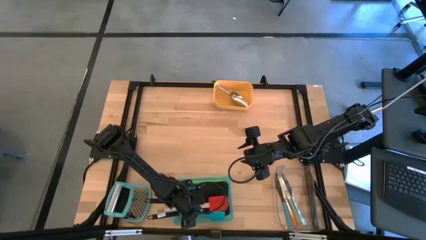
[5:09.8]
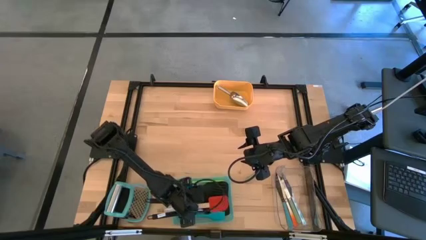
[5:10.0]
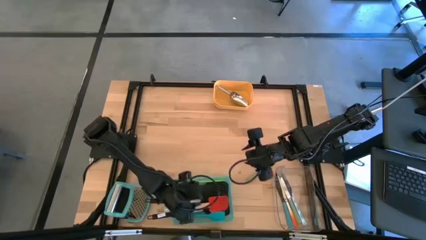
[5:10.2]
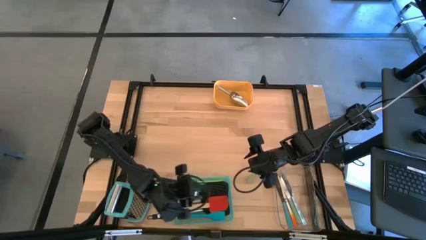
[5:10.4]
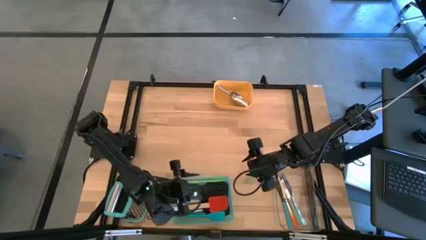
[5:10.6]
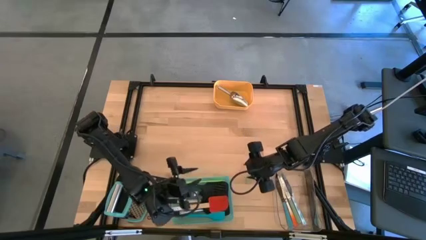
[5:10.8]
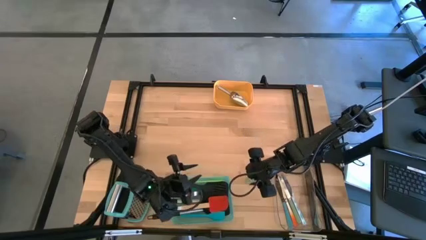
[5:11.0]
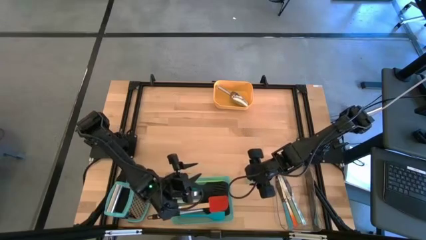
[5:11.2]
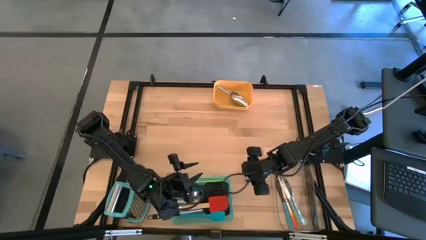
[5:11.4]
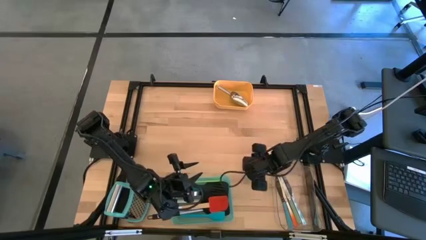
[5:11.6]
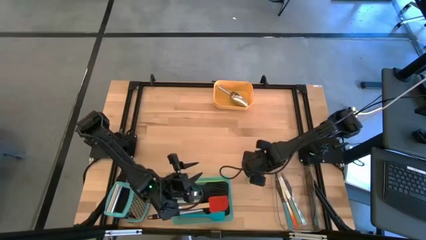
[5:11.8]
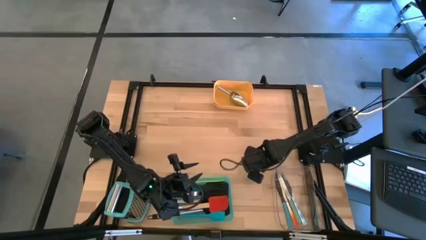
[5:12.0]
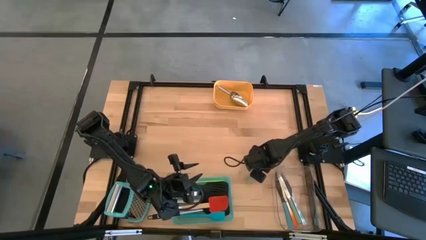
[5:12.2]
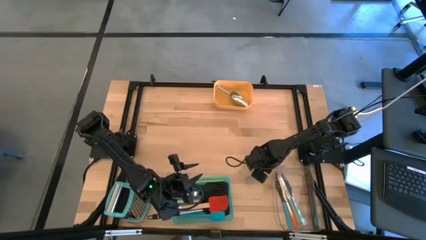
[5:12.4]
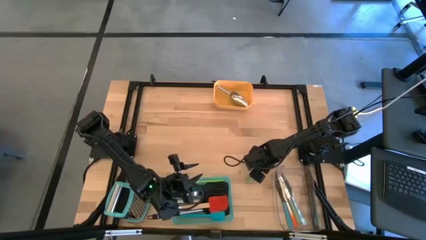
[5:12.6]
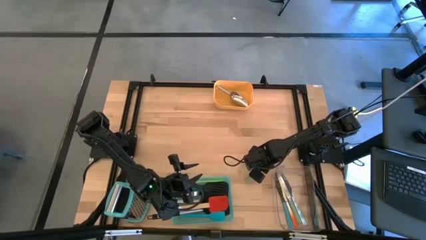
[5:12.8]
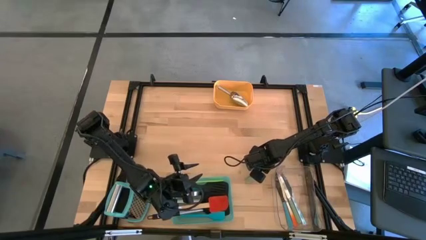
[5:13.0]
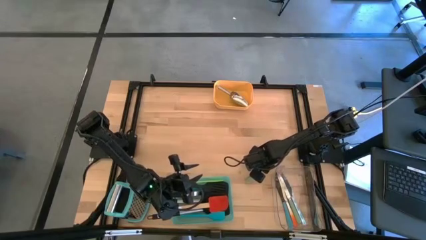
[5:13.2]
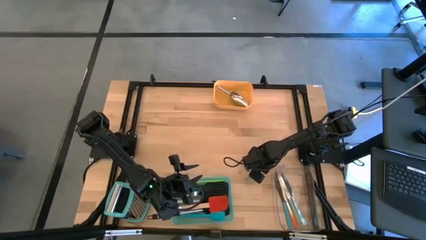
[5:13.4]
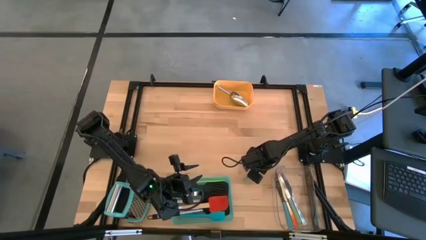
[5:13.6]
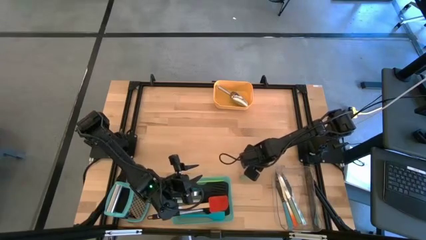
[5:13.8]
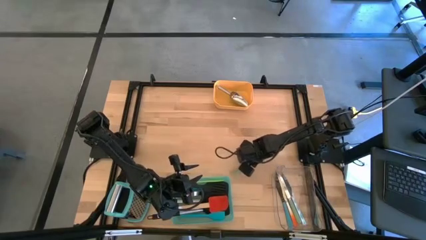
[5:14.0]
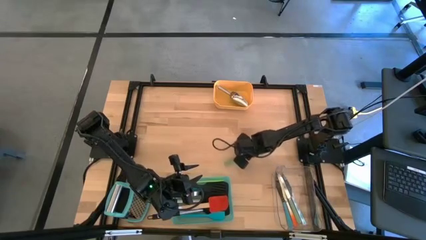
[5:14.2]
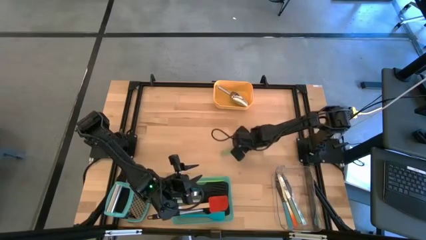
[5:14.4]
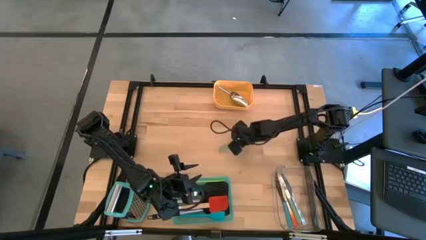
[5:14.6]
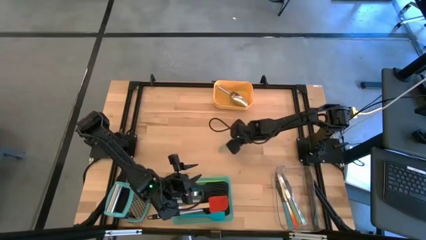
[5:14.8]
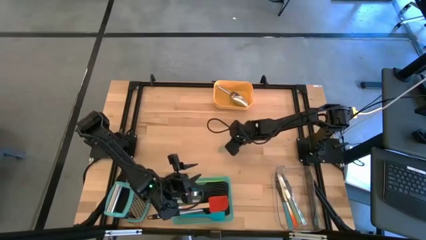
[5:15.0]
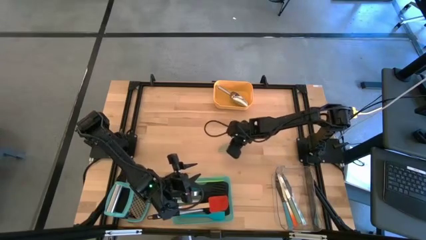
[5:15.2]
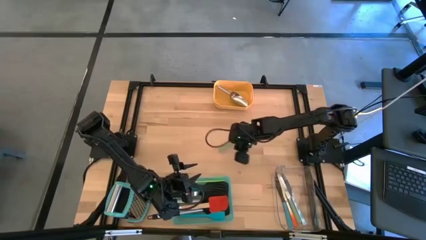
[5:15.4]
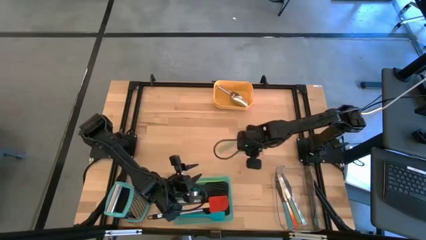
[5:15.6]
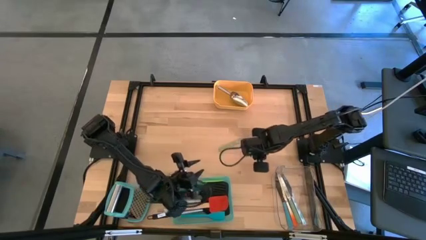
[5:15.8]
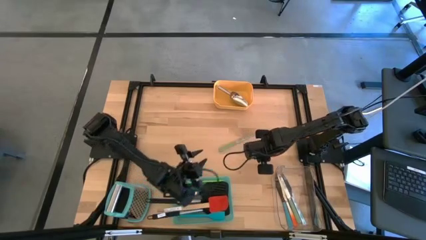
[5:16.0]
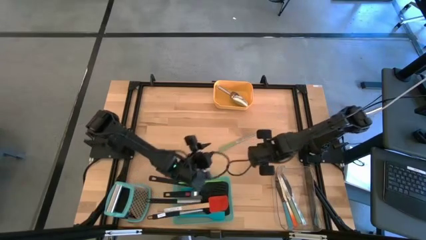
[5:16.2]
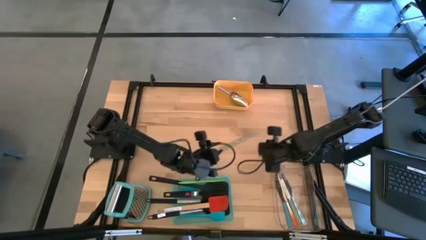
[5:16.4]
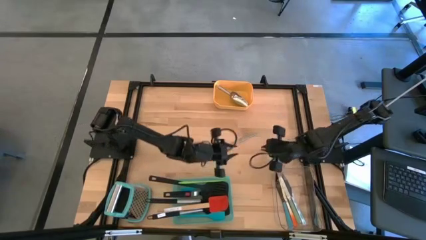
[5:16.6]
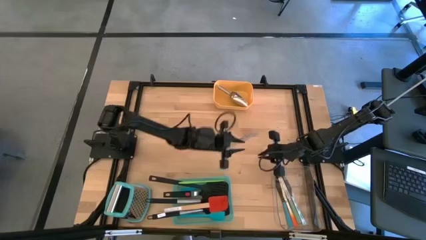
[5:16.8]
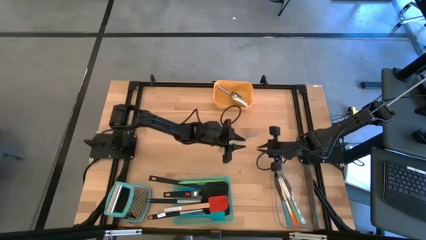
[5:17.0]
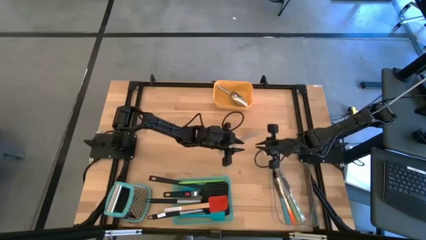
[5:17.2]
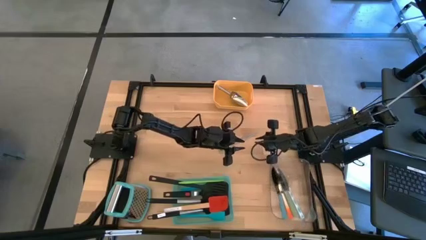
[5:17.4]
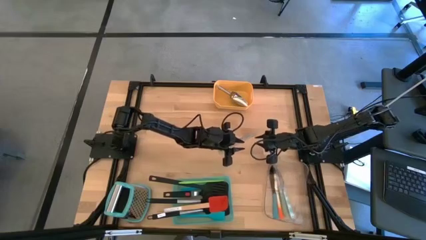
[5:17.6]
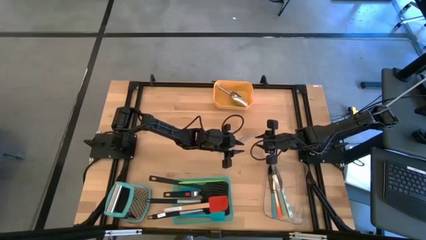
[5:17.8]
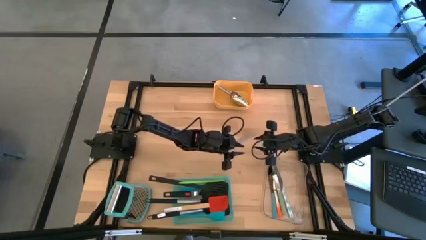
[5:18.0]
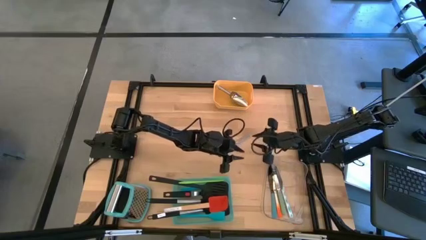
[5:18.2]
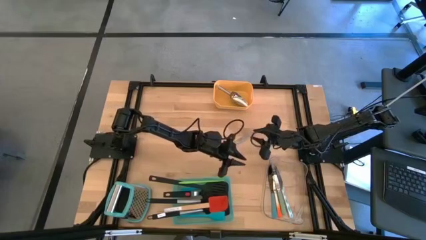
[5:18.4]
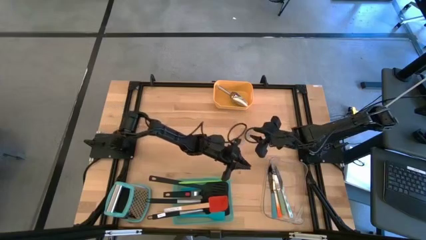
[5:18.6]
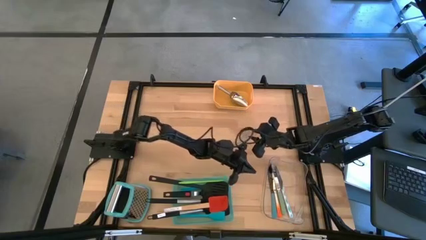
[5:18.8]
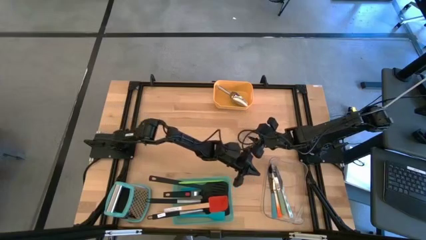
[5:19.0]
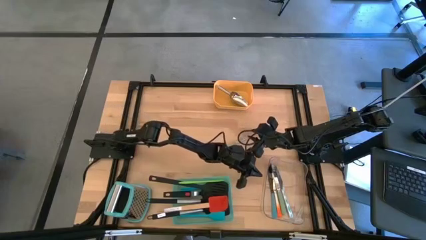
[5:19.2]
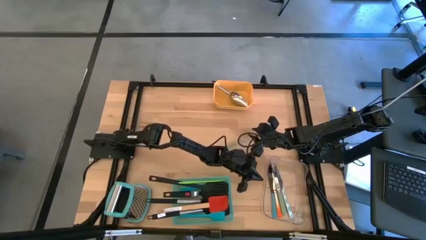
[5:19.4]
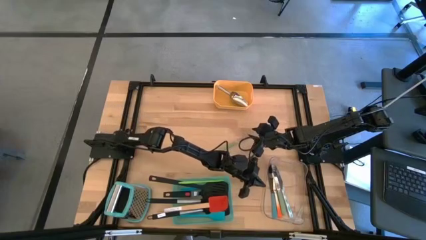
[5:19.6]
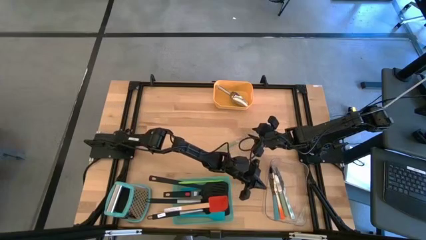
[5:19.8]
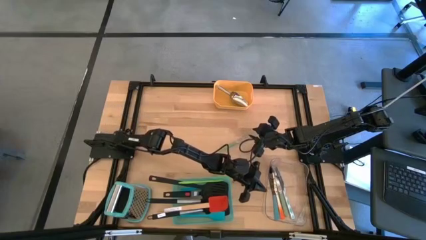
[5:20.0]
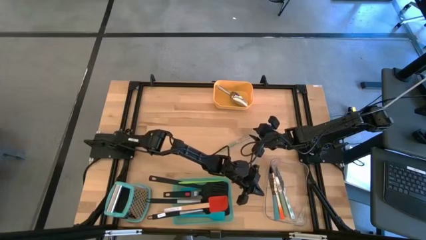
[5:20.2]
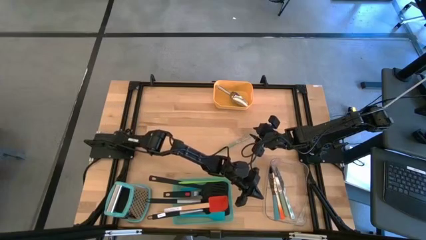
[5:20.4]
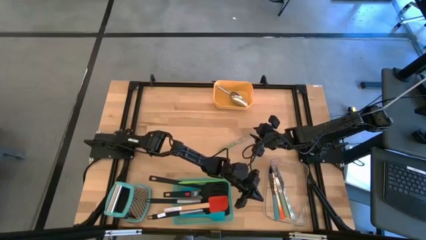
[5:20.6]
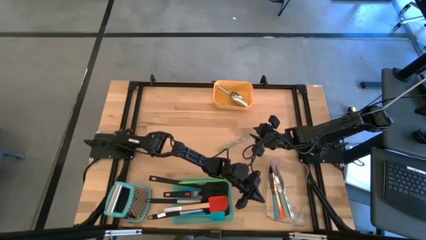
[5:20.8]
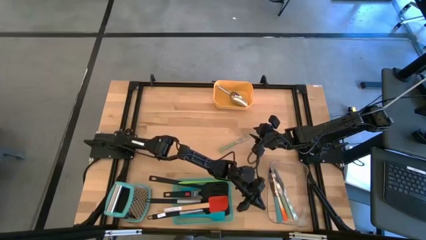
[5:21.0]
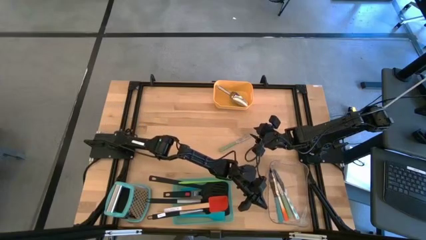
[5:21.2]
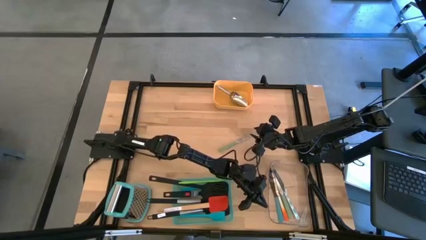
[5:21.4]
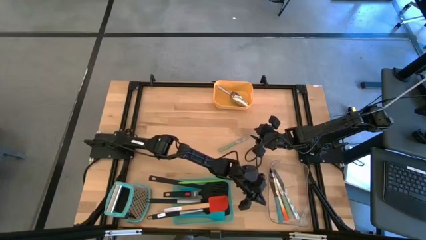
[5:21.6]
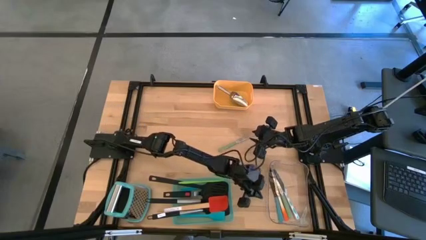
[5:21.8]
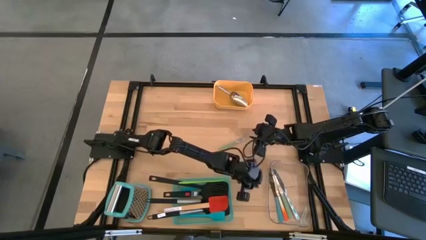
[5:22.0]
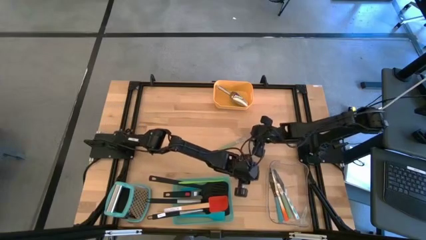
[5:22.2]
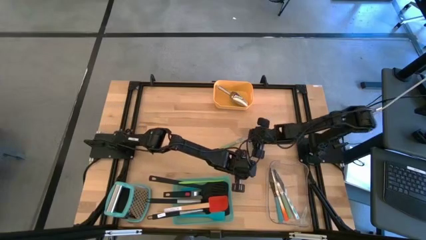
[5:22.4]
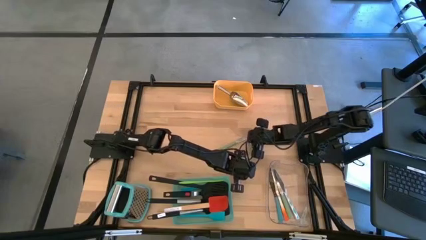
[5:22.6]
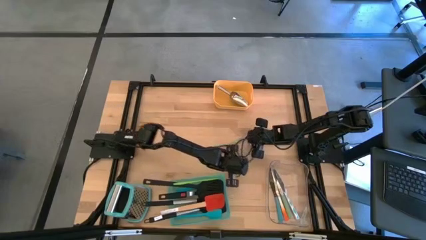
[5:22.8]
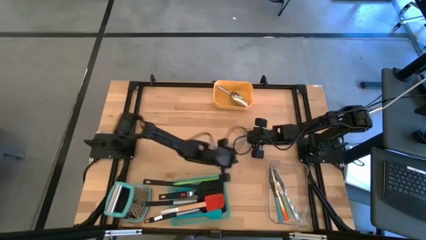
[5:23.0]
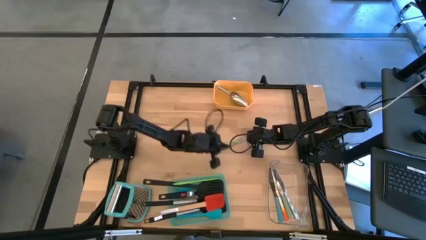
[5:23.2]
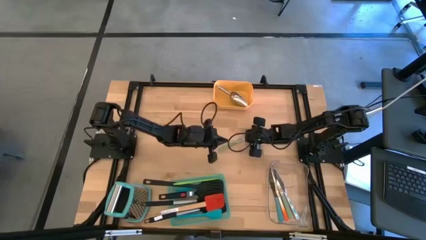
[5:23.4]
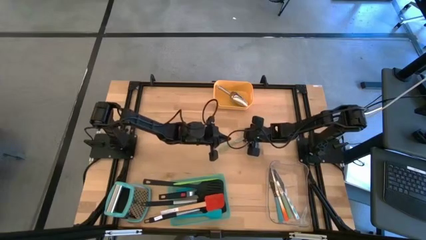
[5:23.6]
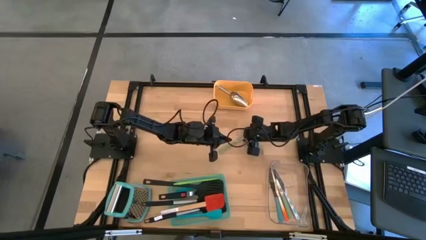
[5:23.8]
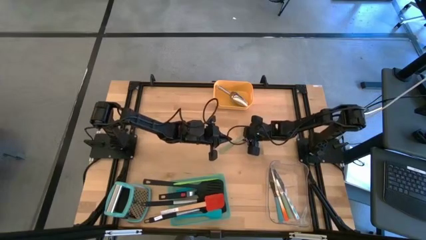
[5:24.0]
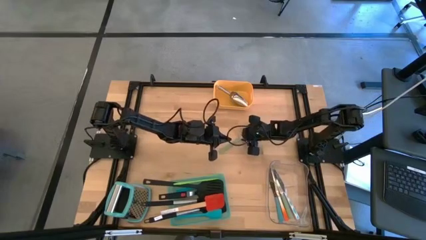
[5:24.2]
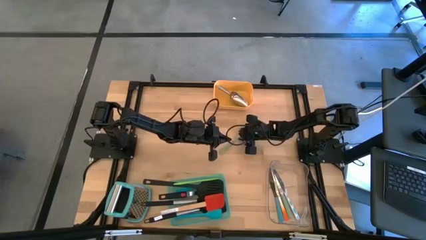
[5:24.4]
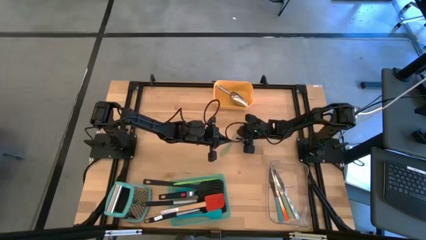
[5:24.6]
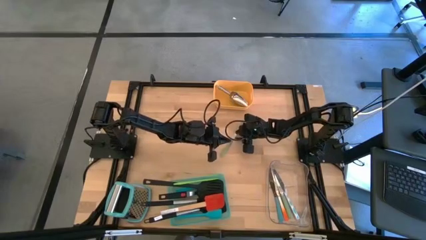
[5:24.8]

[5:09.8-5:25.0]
Task: Pick & Place Kitchen Items
Put the green table knife into the transparent bin
